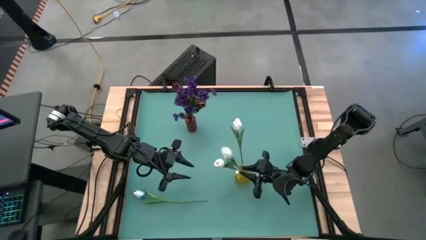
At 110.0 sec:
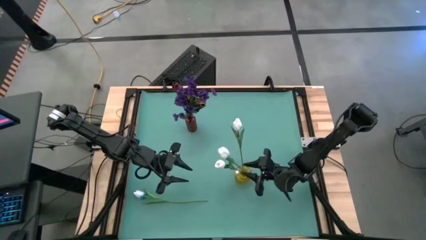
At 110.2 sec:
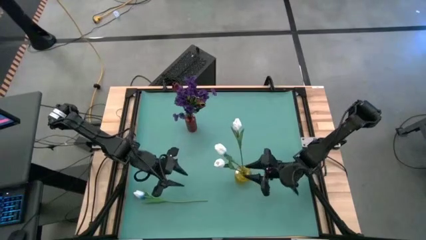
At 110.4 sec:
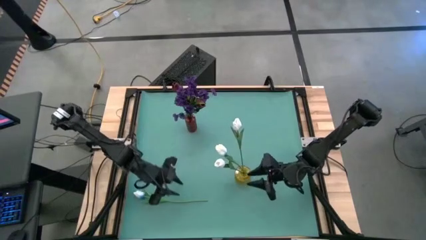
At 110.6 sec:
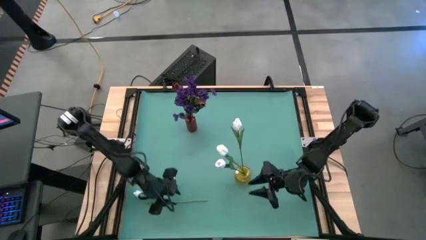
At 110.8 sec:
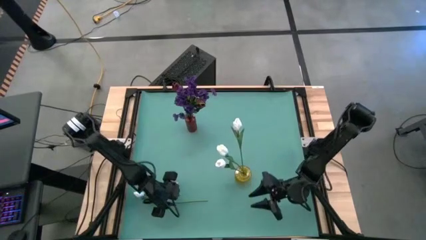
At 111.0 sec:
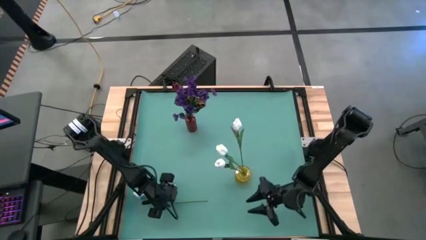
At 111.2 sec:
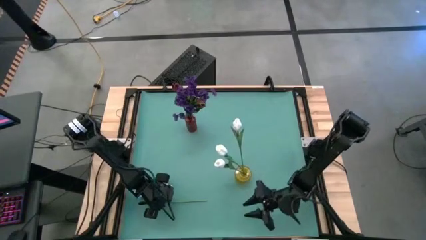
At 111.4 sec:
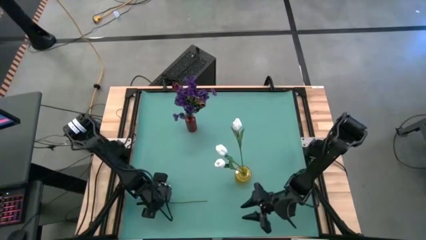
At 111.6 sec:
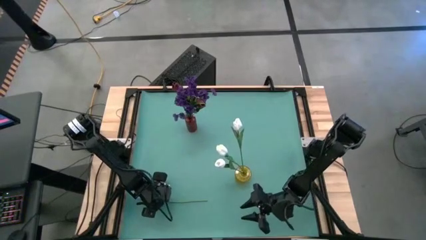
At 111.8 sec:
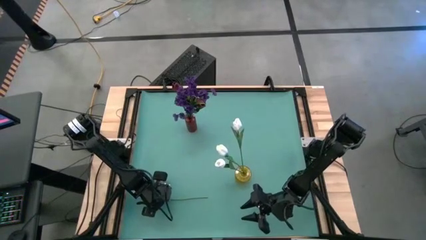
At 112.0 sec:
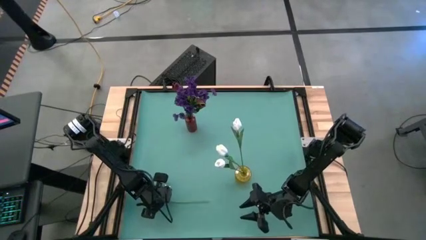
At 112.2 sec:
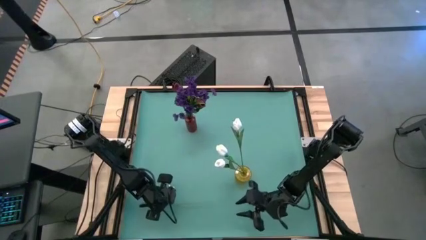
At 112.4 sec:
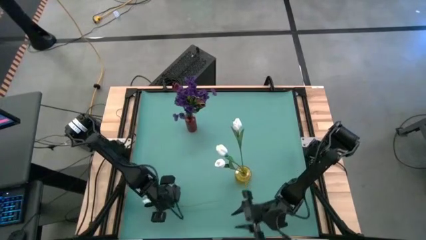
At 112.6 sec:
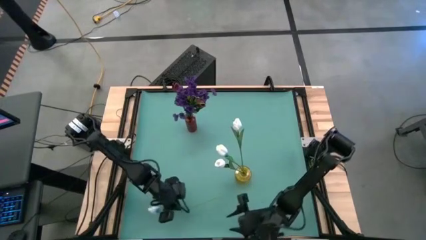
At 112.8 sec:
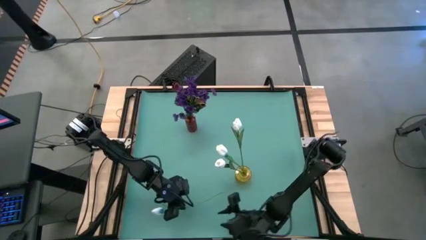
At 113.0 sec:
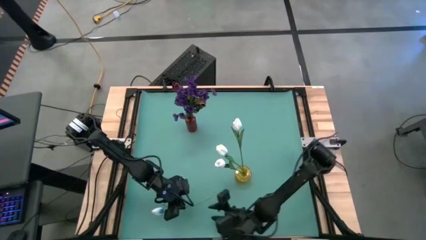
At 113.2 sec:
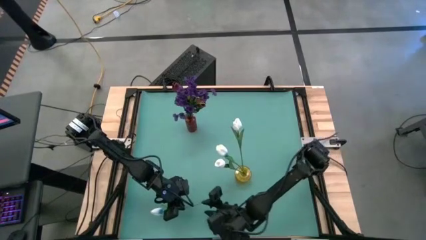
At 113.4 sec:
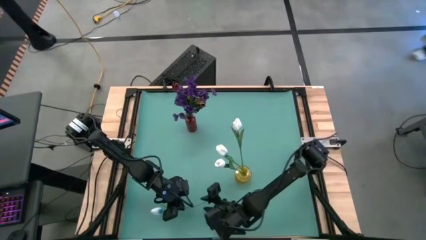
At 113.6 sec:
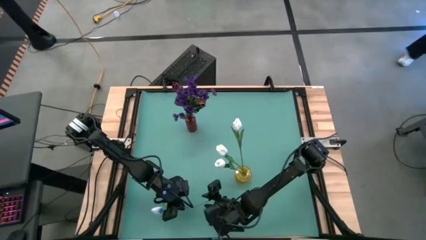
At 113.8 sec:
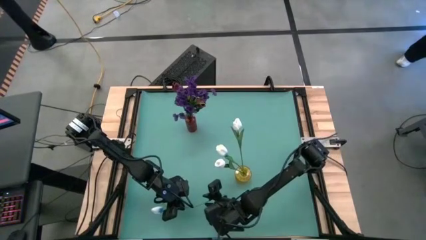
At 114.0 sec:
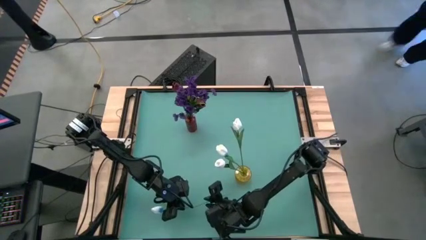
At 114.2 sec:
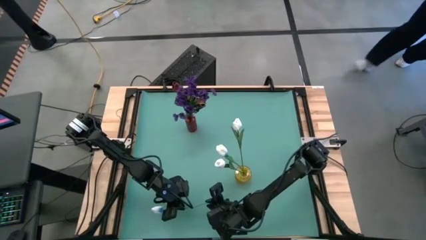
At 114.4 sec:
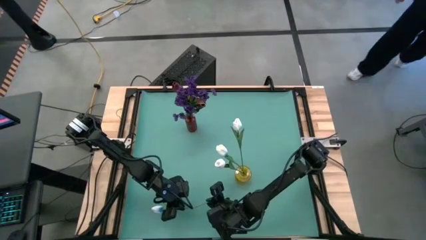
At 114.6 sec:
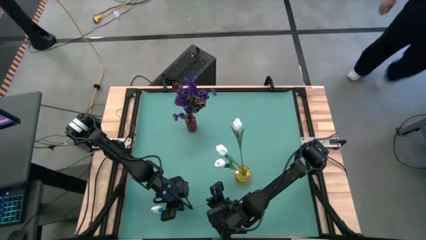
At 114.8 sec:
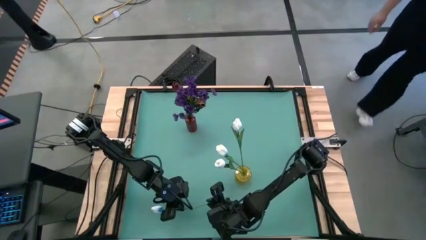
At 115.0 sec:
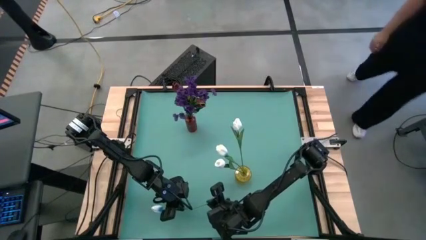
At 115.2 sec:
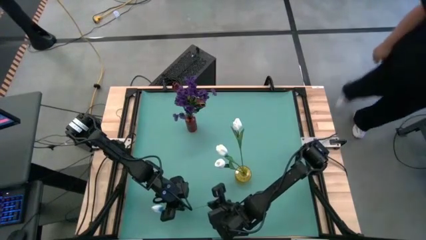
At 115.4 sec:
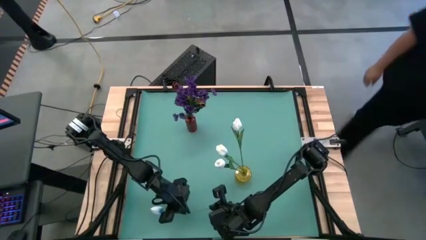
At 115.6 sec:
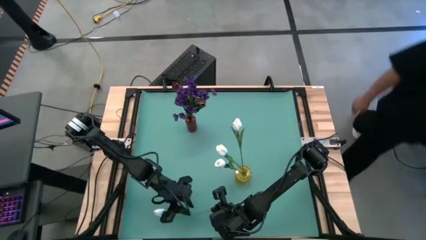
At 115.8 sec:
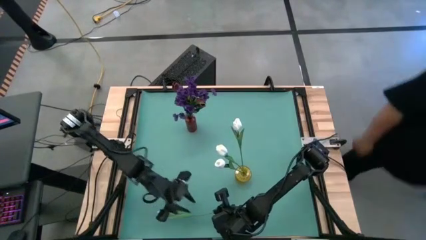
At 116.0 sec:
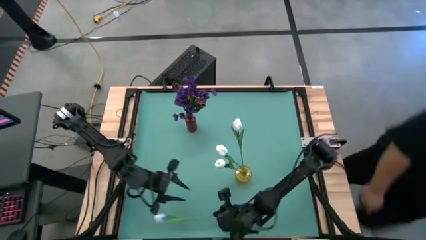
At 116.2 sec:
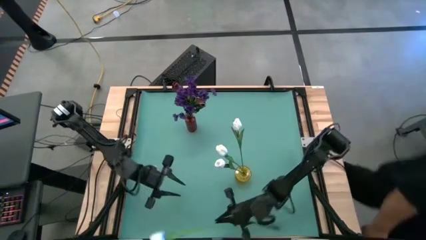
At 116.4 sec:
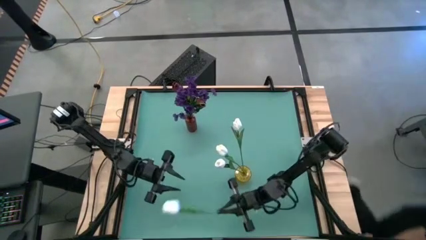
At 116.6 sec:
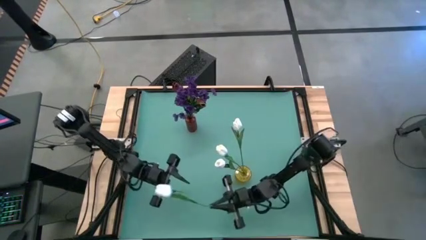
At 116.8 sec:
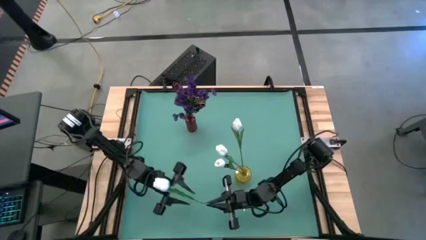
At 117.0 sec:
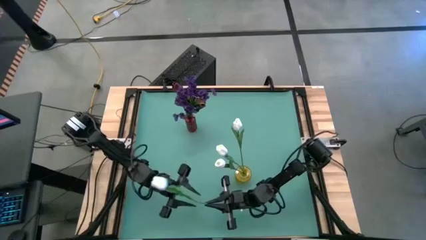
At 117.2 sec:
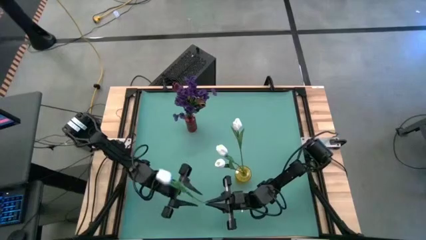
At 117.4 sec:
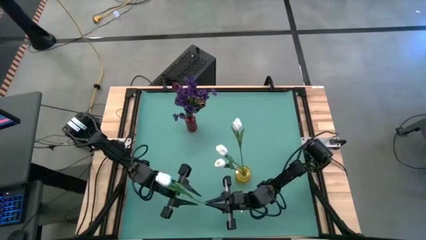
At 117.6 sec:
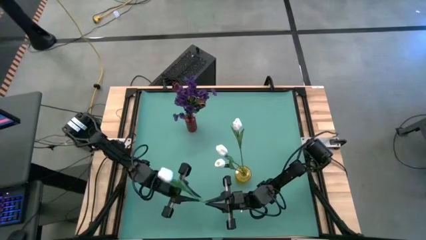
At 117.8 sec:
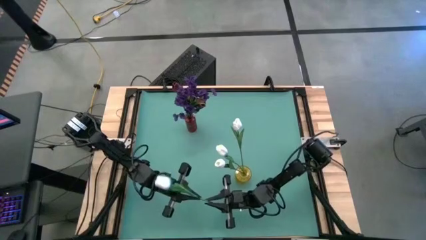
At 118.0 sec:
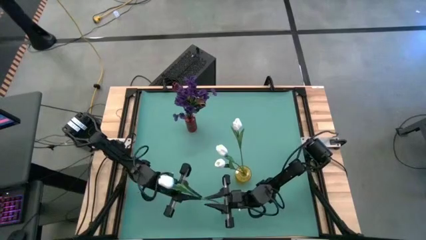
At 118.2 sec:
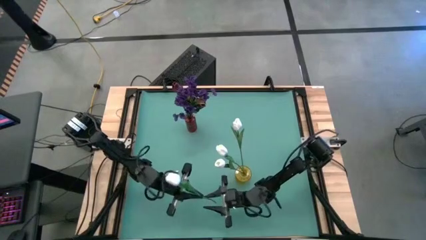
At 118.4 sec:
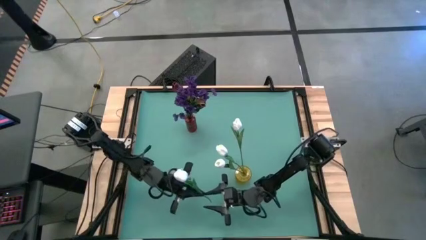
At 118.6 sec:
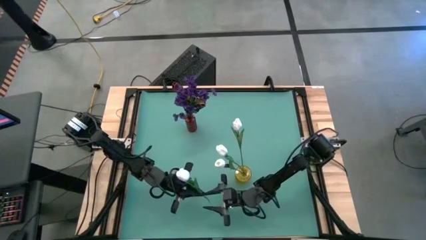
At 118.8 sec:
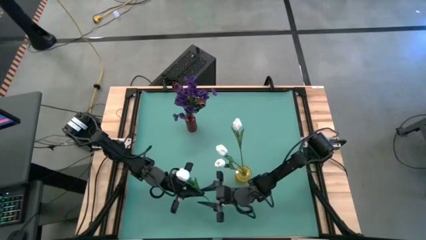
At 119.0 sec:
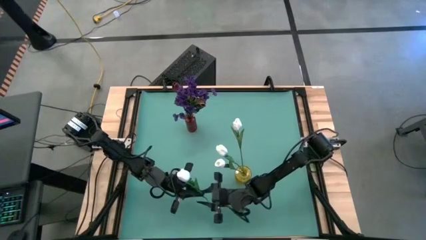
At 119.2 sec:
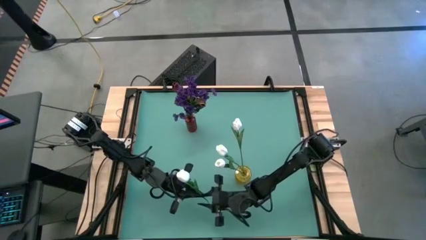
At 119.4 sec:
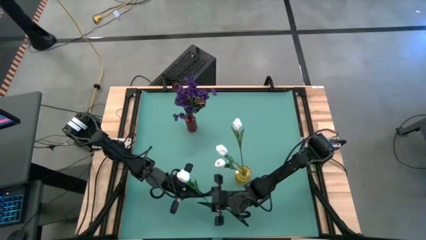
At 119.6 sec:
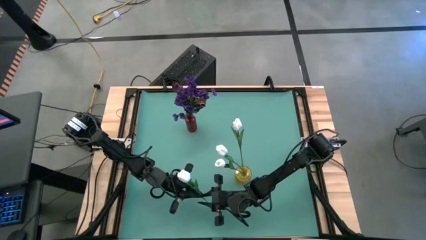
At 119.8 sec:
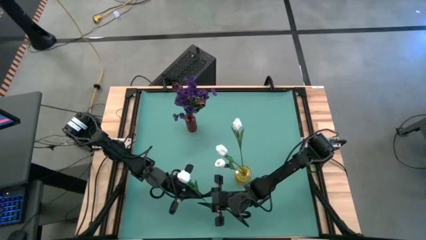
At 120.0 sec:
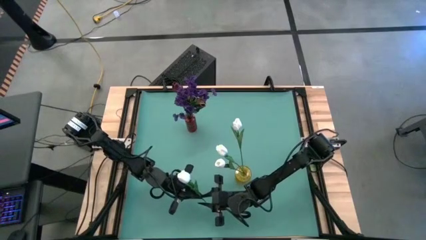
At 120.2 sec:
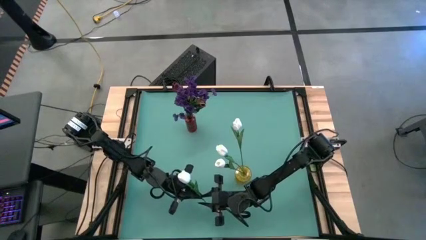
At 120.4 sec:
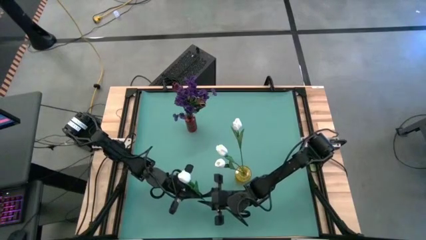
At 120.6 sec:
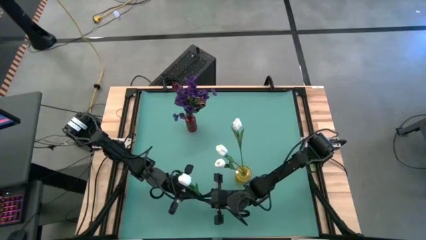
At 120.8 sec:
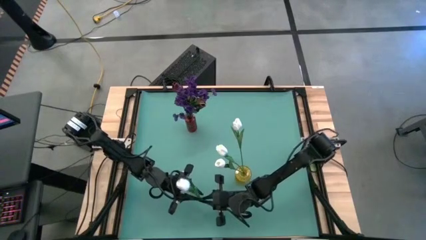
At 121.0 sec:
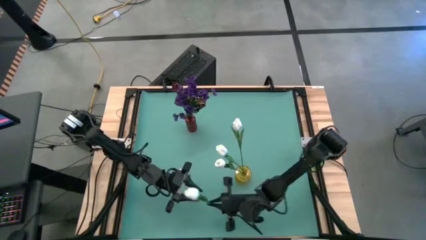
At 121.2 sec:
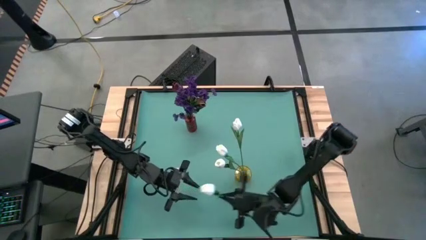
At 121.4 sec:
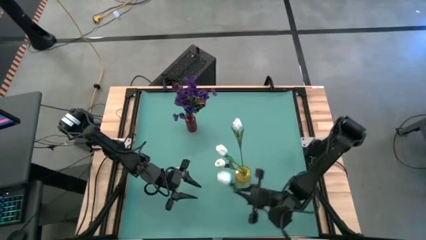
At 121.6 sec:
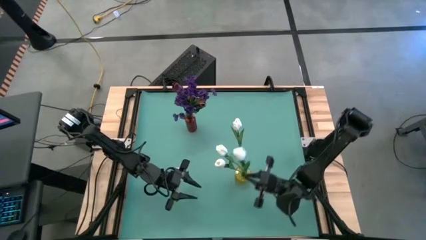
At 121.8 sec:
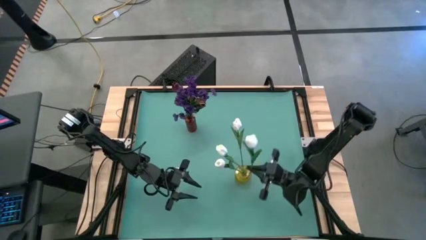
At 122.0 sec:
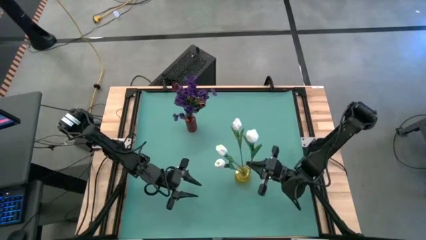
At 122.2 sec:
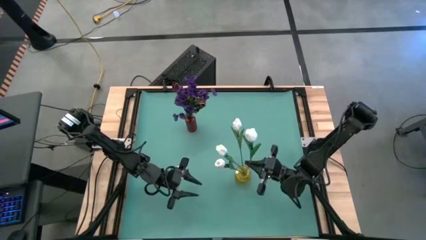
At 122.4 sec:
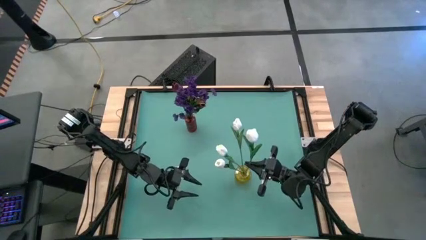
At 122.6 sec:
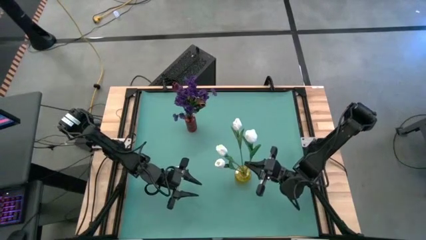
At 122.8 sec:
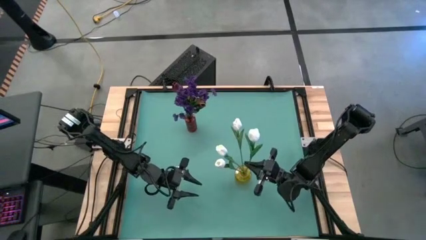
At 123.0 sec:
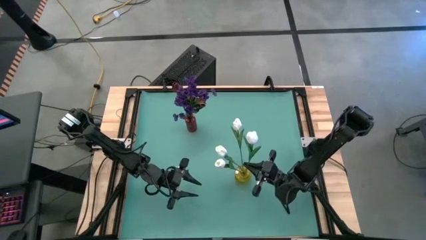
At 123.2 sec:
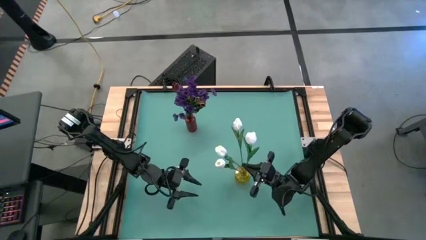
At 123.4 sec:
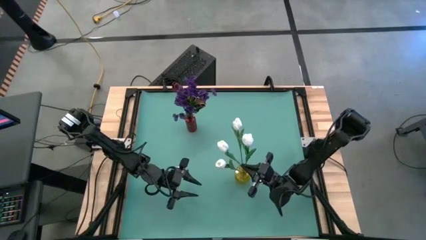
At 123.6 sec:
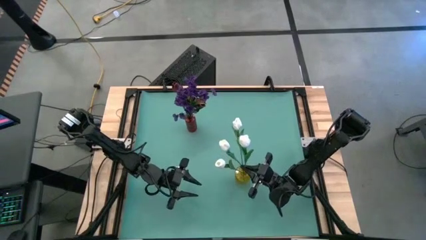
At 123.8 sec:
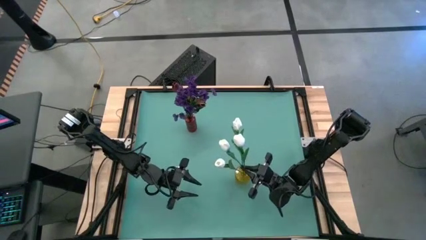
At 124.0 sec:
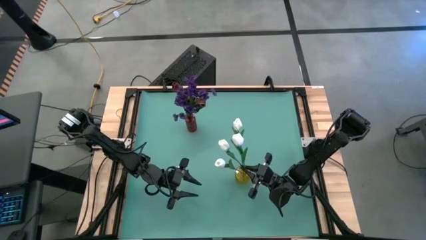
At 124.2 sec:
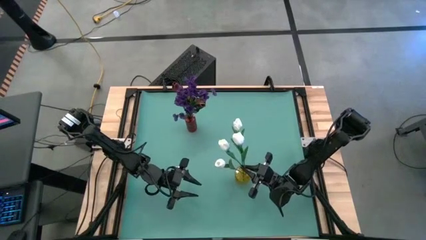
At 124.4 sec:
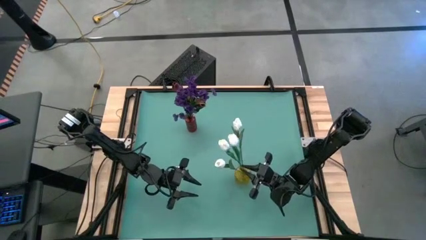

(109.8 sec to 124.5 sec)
Task: Sort flowers into vase by color
Put the white flower into the yellow flower vase
